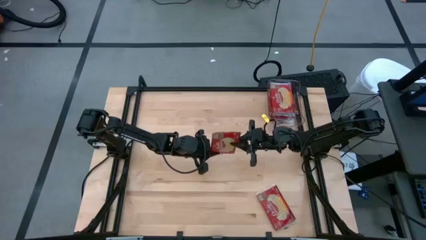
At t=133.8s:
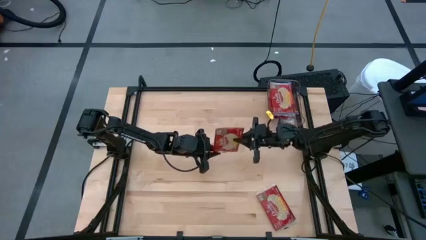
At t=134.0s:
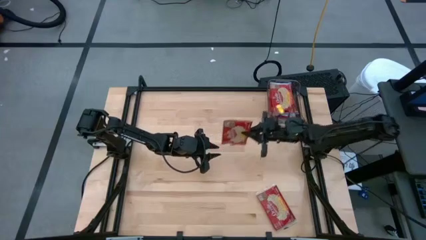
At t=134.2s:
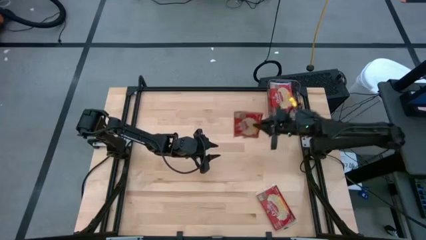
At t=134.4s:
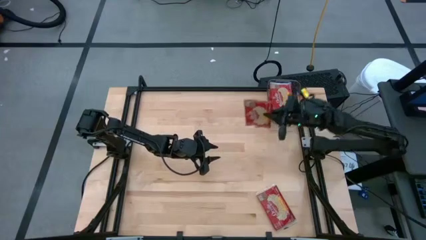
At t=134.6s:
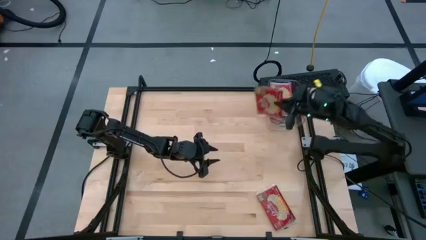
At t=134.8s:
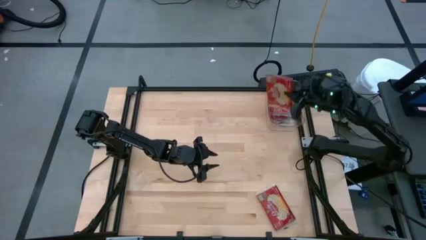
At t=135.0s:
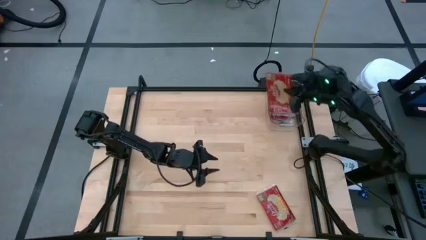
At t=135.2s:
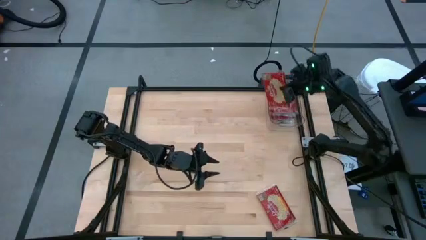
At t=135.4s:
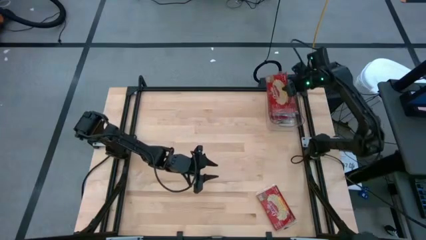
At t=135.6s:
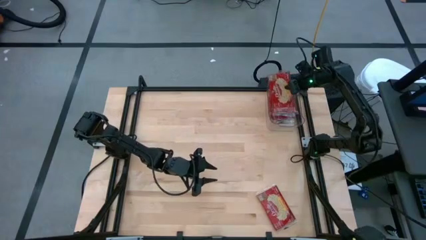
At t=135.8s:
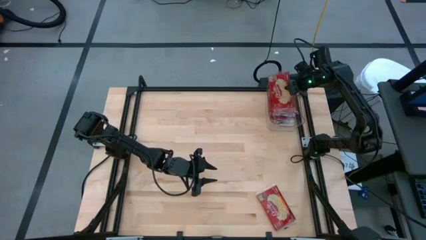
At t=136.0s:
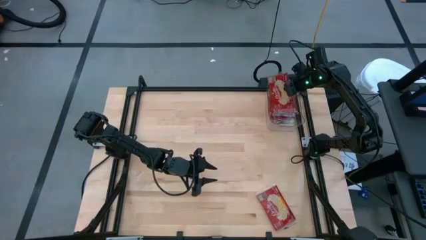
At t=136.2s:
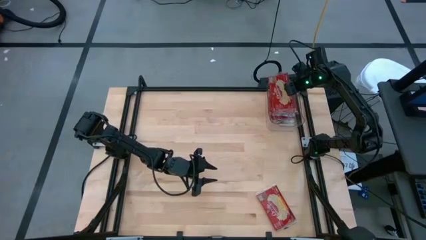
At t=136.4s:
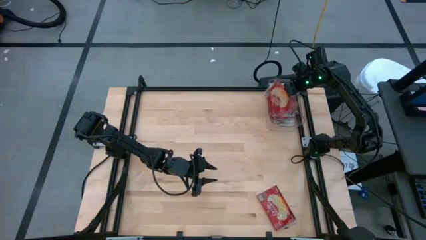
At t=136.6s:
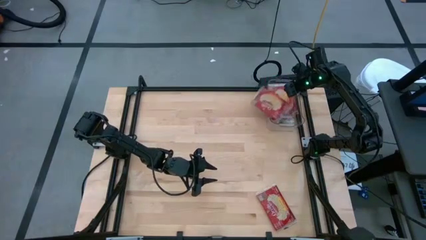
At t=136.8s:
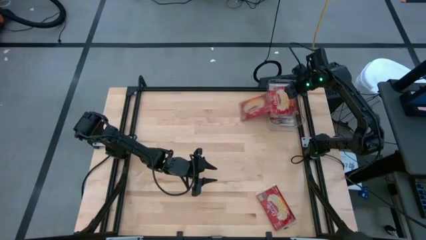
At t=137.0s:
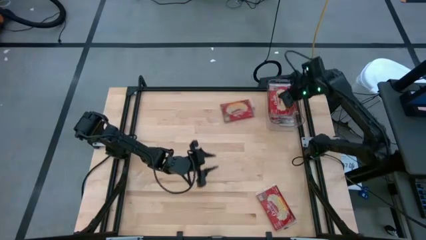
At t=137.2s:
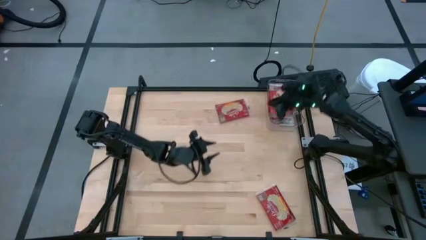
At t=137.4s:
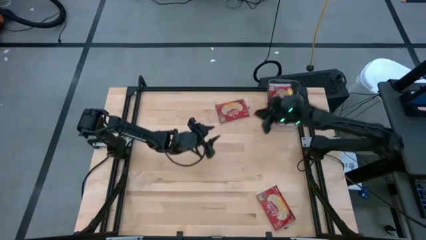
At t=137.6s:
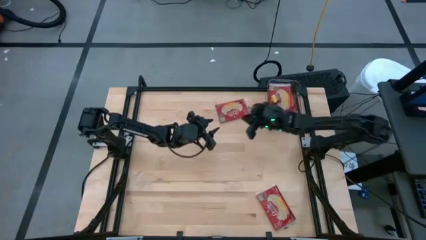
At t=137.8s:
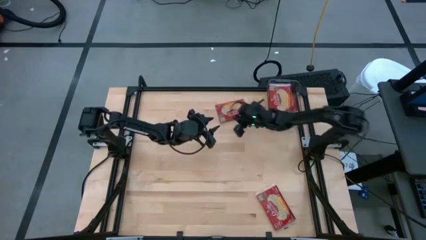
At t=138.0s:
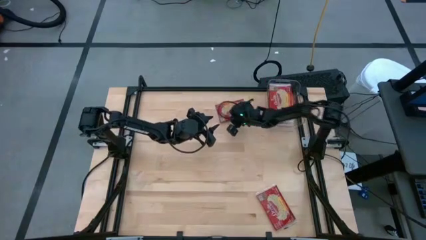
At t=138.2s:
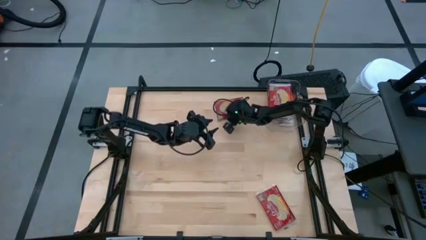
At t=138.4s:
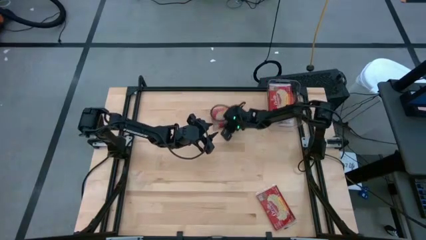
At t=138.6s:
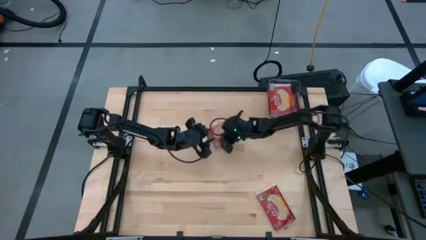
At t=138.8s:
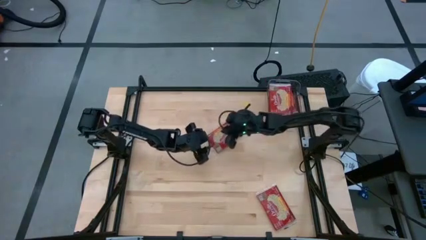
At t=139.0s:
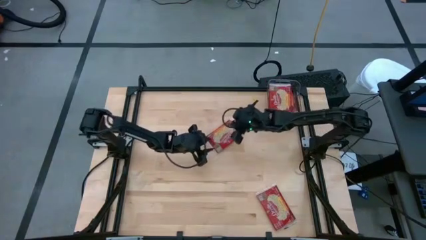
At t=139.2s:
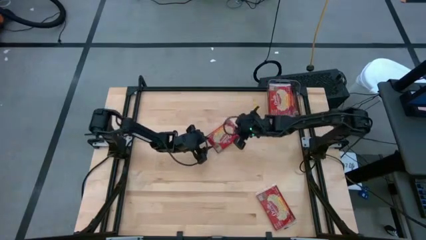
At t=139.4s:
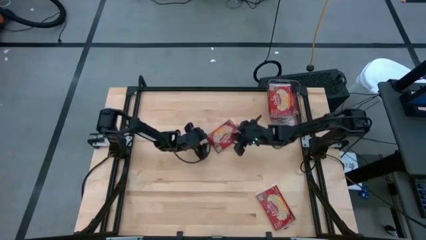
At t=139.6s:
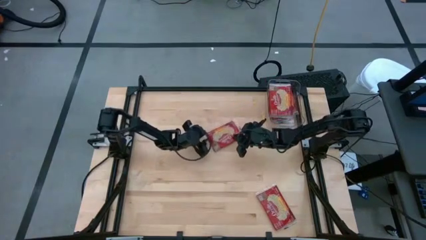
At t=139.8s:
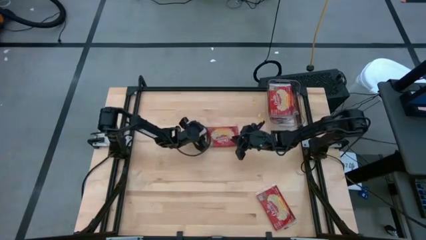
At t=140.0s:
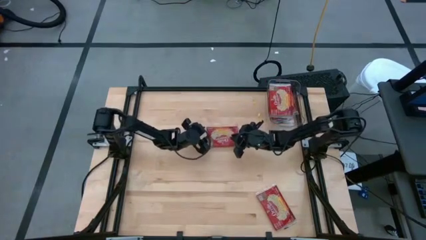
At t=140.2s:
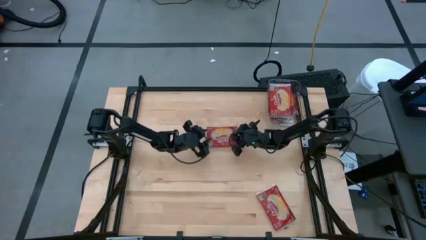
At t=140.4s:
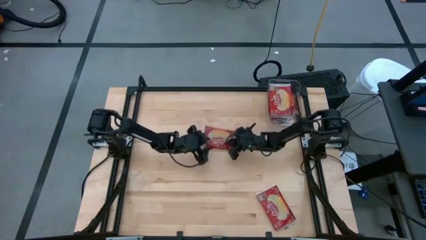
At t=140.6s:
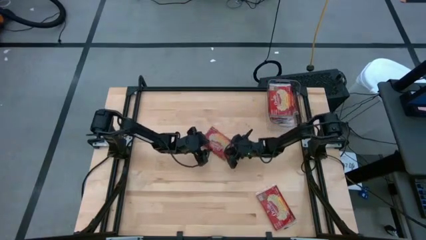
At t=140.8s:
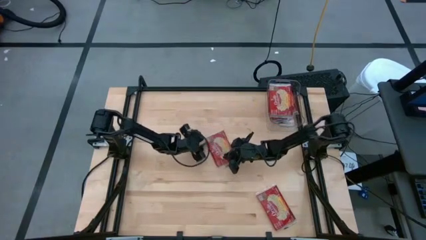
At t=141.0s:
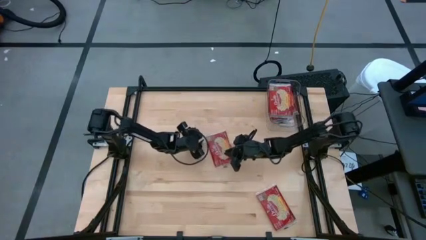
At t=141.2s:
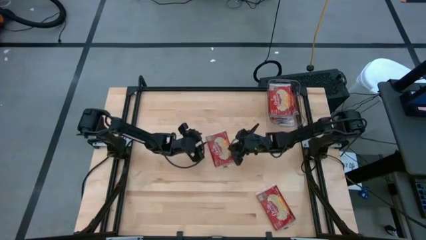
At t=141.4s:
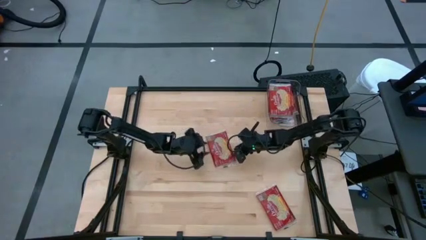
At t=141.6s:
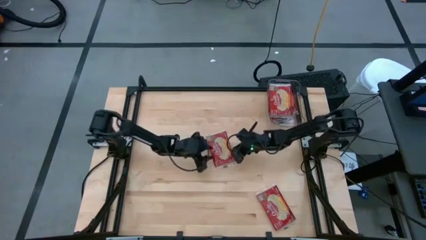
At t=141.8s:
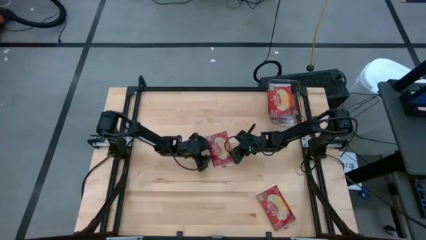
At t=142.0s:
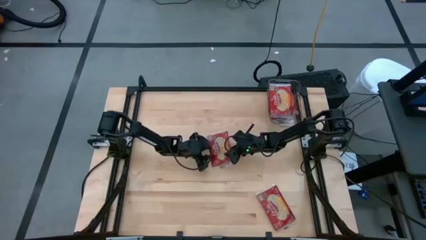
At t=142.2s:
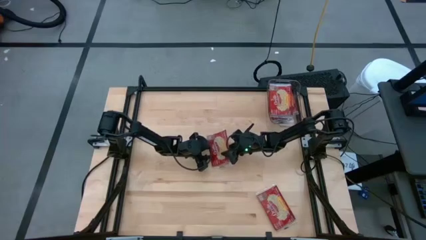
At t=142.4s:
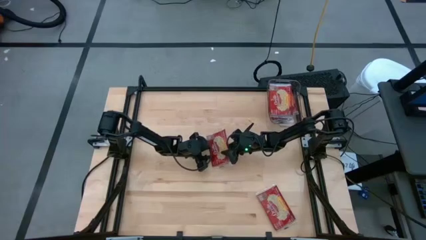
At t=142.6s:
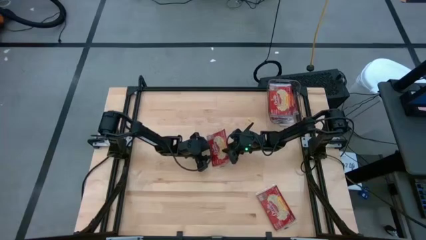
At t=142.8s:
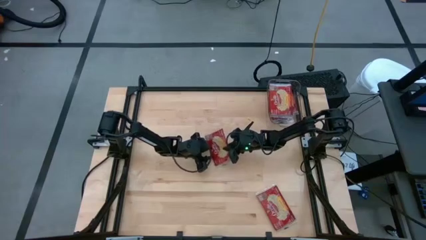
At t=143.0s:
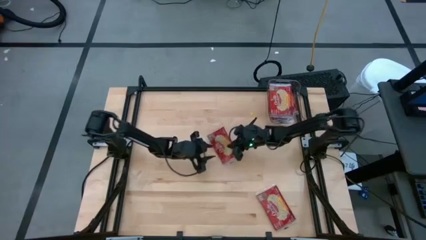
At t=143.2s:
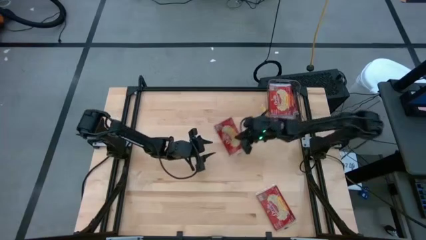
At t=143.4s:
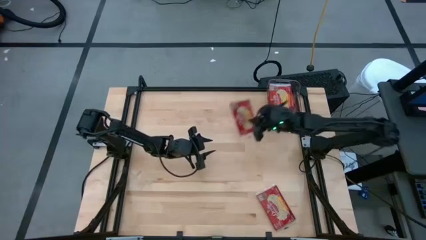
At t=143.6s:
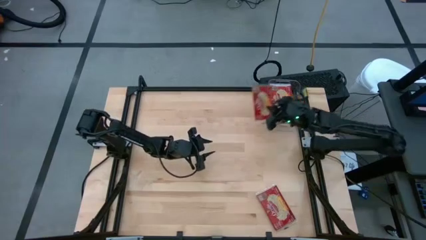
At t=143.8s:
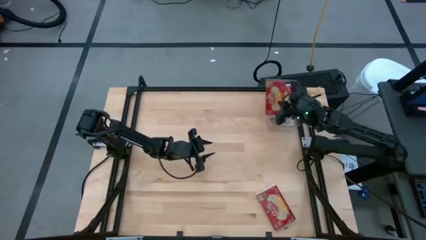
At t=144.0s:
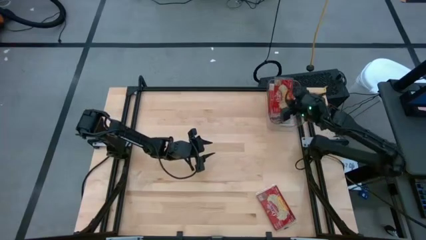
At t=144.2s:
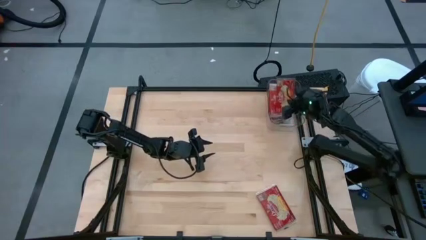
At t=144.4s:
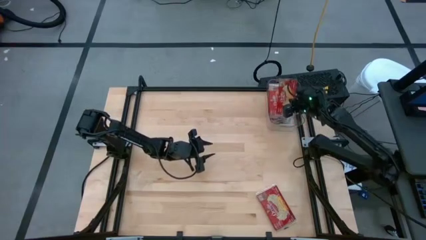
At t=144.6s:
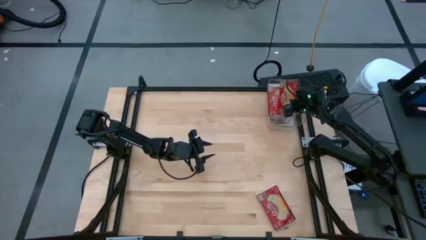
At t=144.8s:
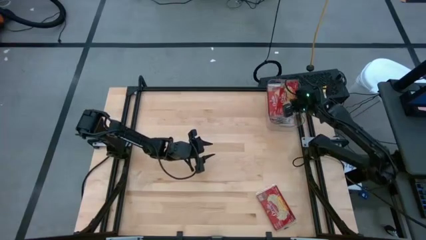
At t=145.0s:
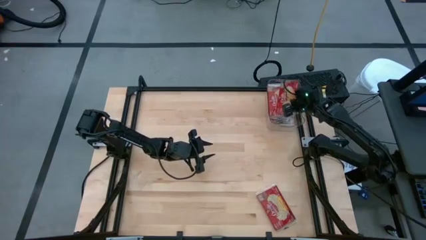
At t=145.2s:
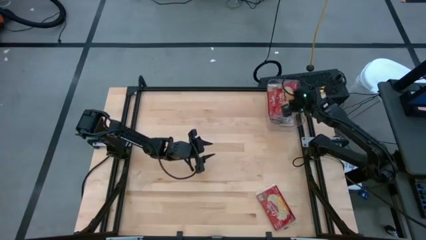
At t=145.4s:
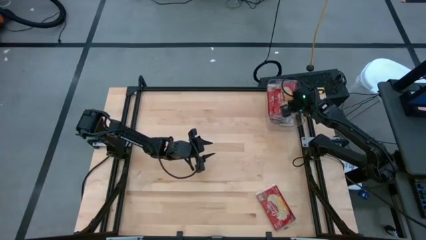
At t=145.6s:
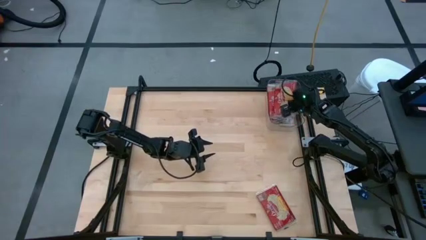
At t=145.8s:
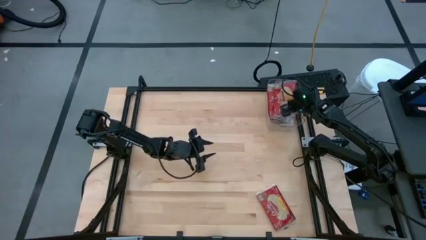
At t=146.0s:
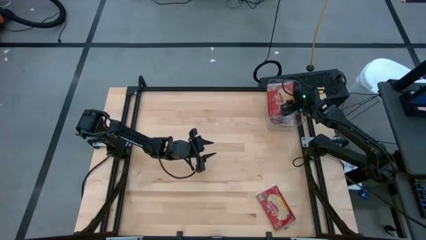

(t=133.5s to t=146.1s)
Task: Sort popcorn bags into baskets
Put the red popcorn bag into the transparent bin

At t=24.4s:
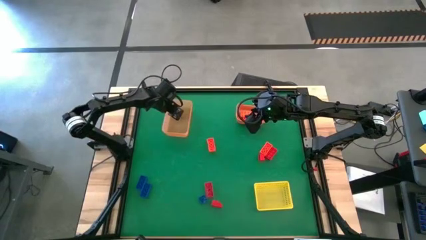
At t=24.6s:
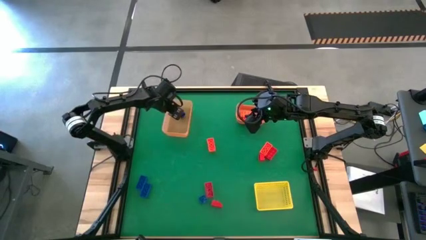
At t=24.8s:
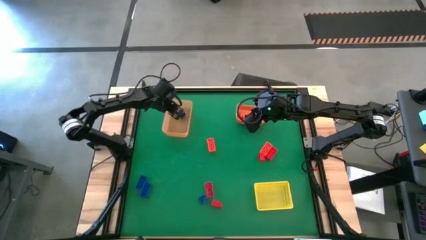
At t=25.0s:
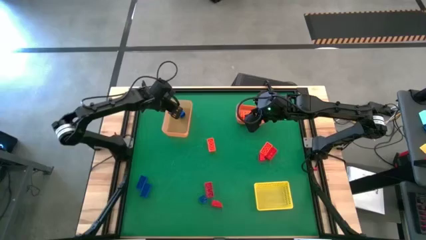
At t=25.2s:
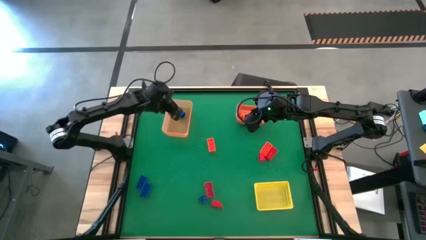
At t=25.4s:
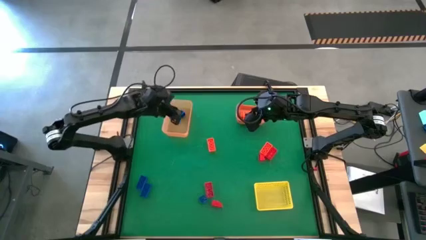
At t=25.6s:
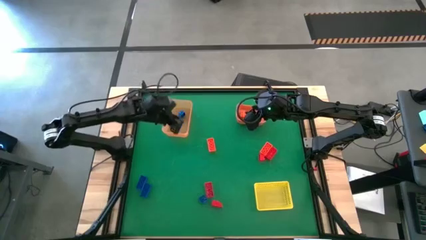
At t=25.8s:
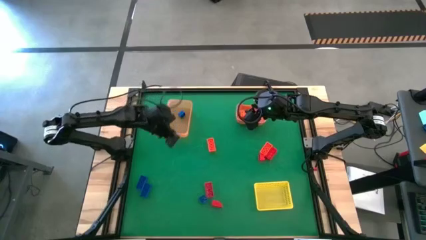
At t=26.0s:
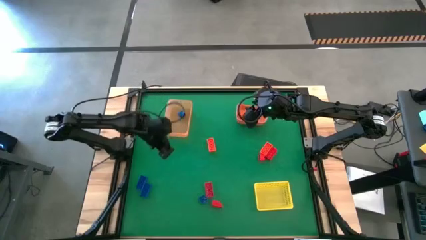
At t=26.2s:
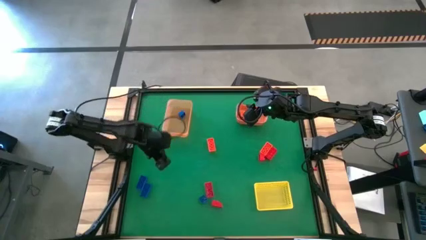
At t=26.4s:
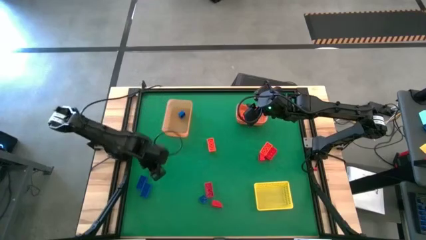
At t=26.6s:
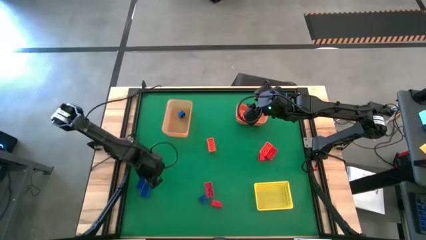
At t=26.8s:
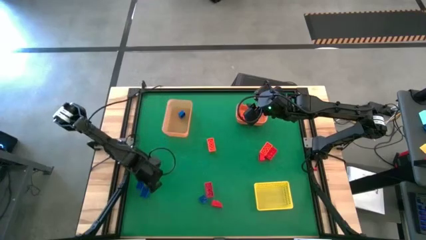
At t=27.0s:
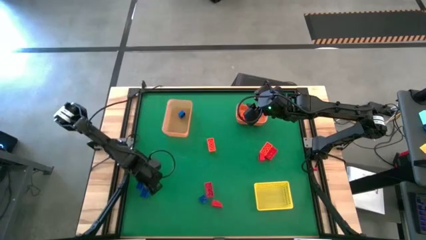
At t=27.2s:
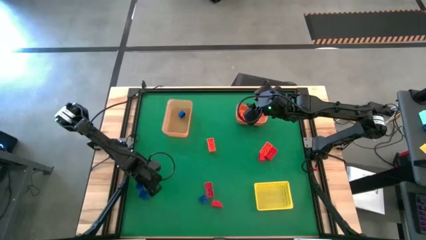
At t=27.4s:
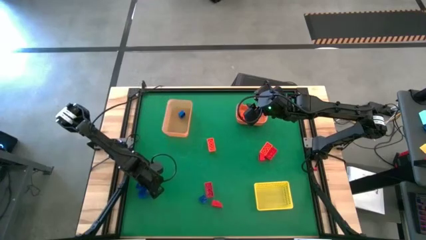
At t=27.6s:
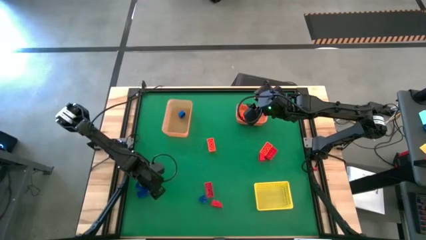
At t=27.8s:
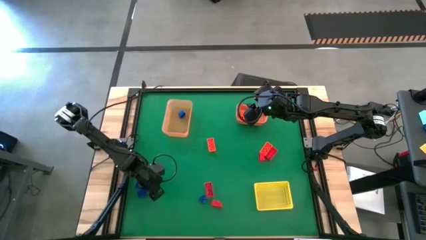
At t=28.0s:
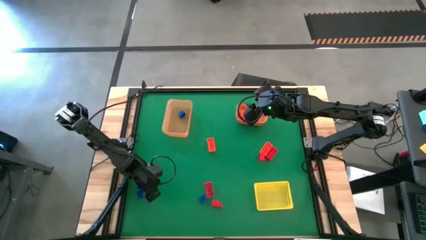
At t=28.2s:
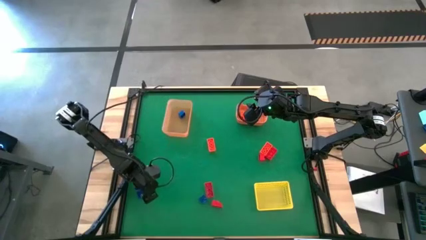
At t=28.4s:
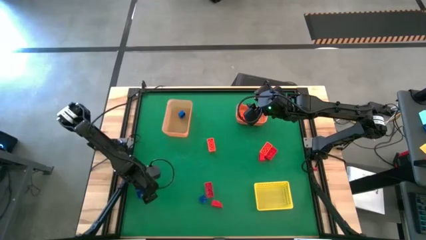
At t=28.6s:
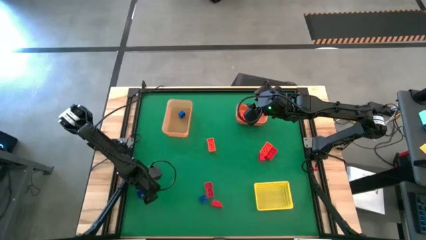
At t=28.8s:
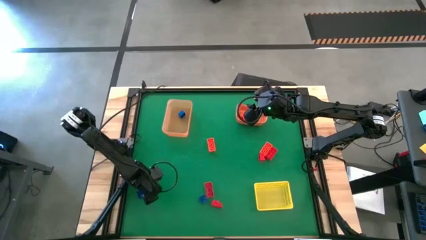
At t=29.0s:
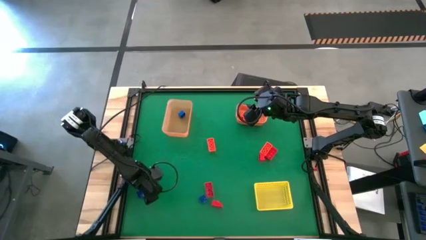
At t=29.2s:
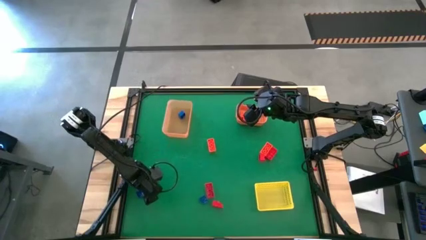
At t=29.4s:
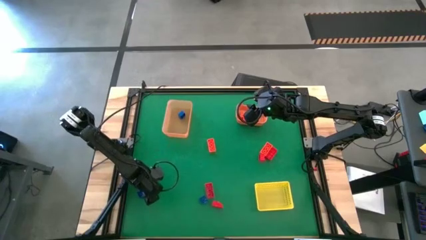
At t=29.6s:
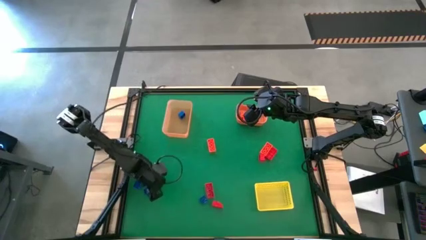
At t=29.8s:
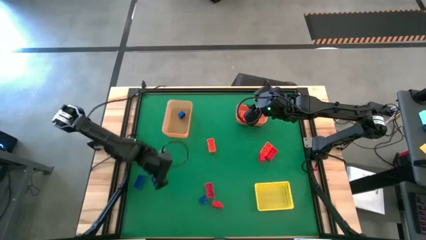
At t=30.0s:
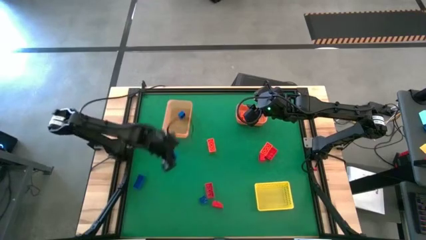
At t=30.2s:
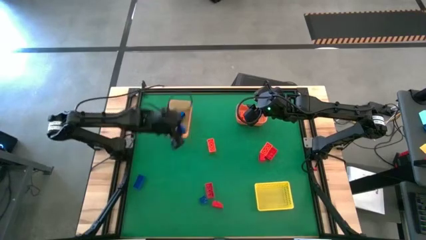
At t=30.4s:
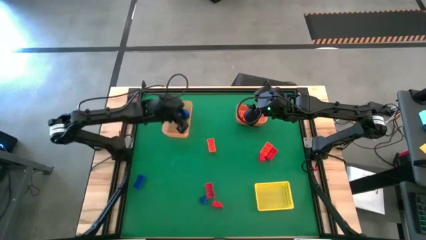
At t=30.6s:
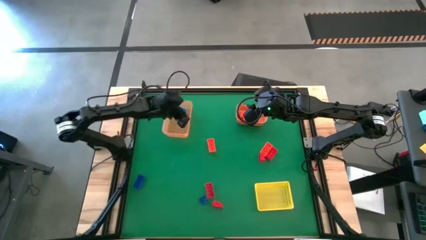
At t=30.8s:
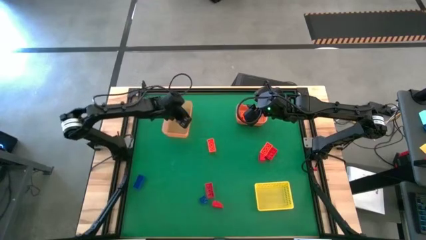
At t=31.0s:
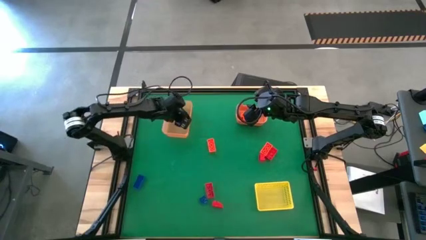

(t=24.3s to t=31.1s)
Task: Sort & place blocks by color
Put the blue game piece into the light orange bin
